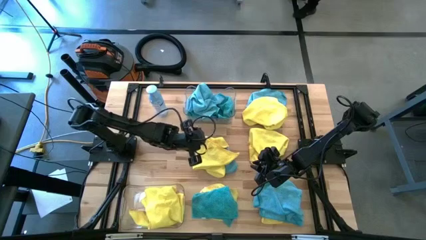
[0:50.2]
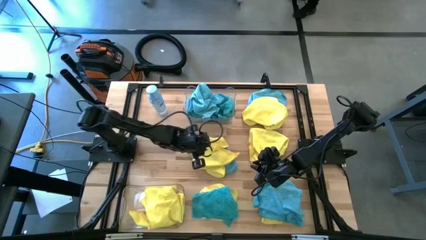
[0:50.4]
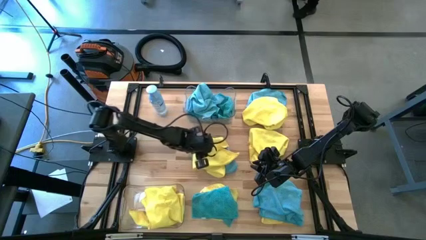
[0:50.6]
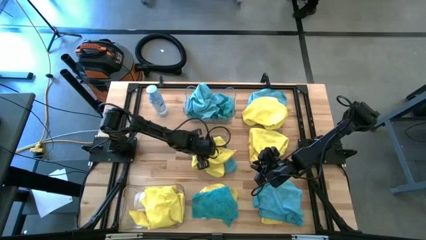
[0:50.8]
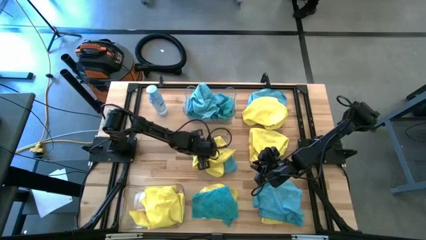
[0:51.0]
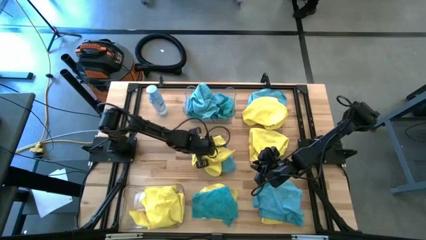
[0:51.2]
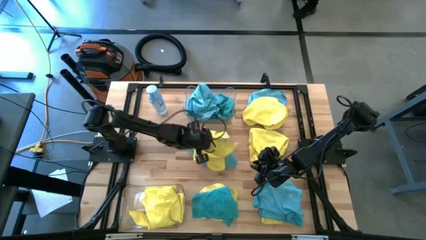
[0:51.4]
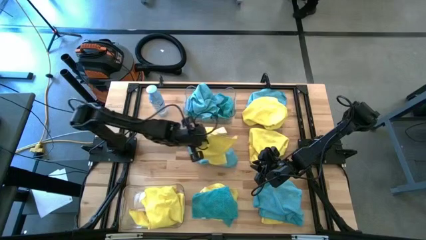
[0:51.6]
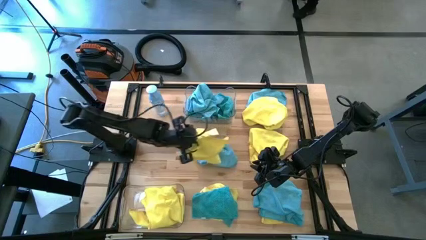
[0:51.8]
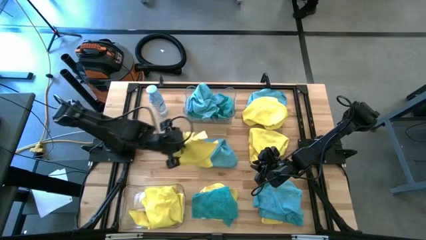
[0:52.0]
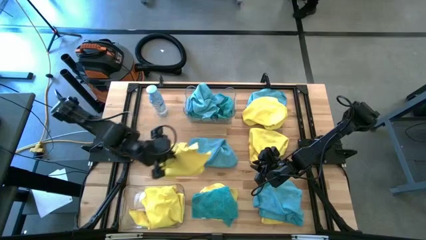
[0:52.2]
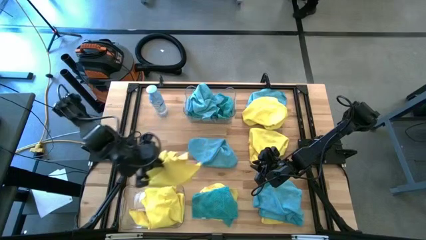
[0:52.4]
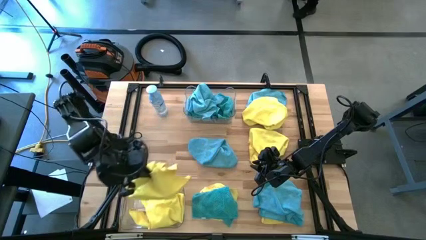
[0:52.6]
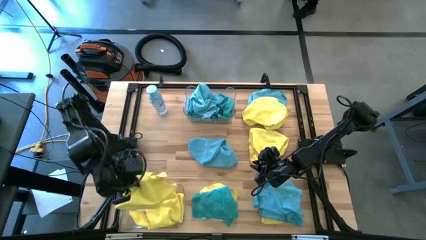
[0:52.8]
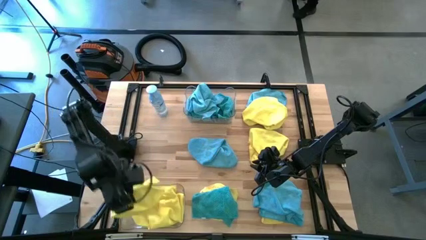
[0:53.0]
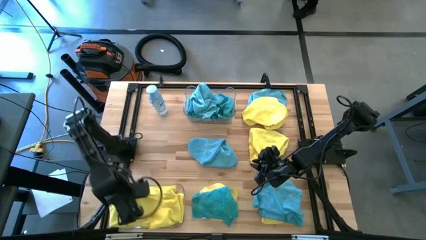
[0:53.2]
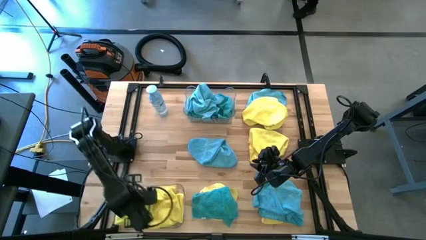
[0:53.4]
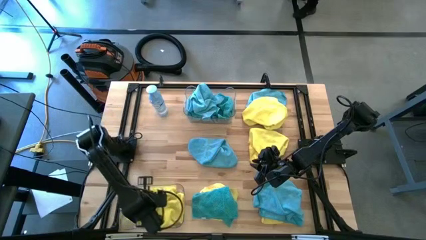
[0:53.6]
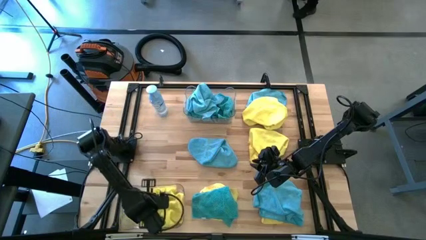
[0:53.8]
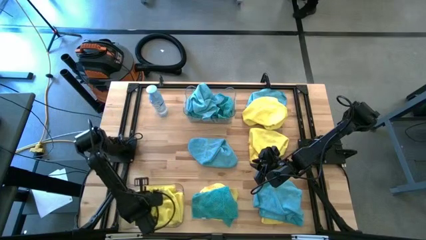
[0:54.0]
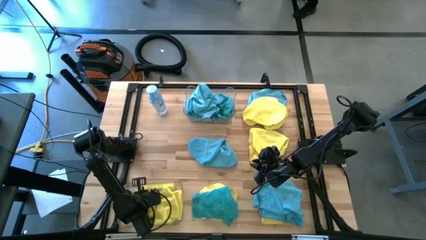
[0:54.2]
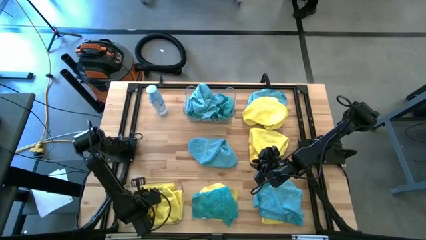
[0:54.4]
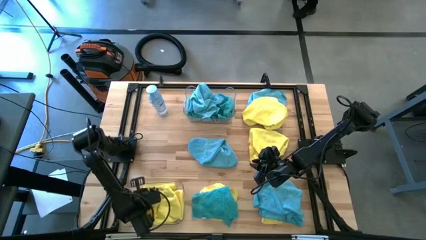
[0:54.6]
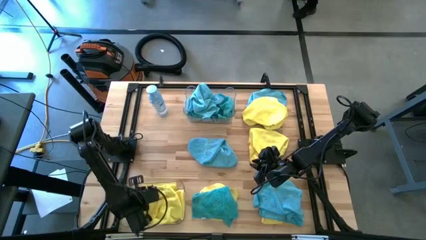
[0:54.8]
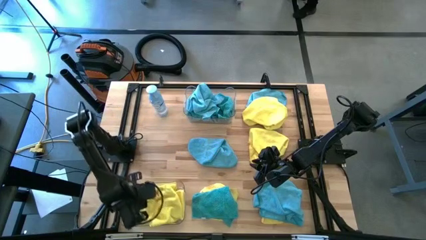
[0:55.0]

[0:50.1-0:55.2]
Task: Sort microfiber towel by color & place in baskets
Put the yellow microfiber towel into the bottom transparent bin

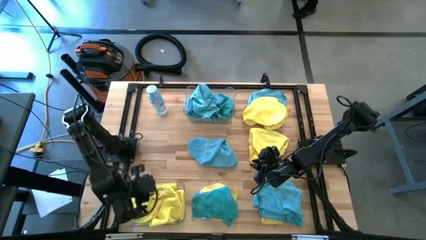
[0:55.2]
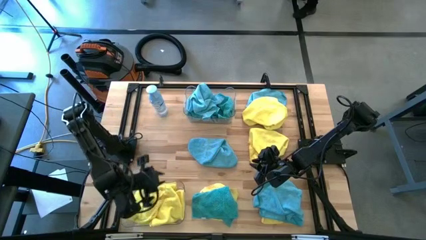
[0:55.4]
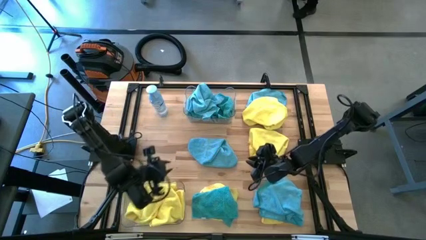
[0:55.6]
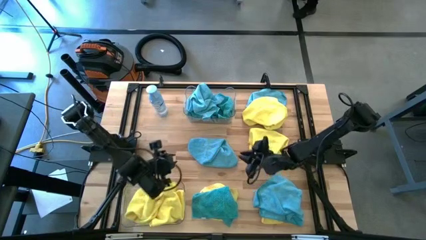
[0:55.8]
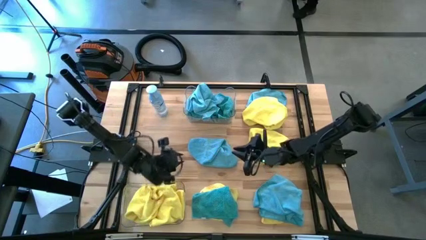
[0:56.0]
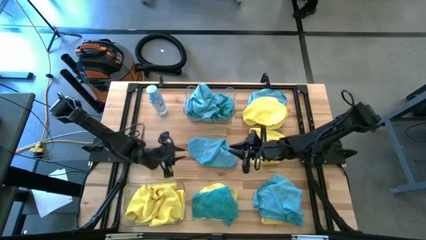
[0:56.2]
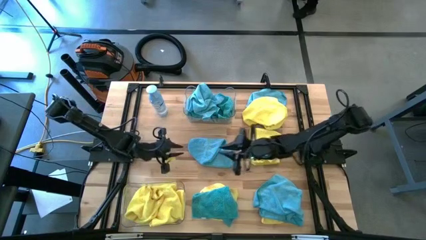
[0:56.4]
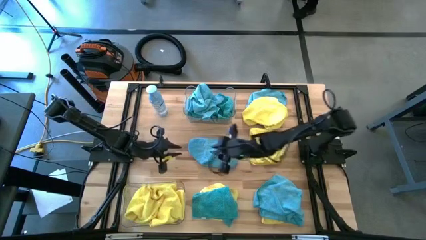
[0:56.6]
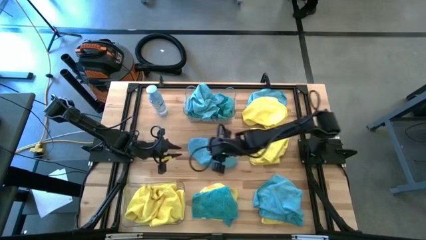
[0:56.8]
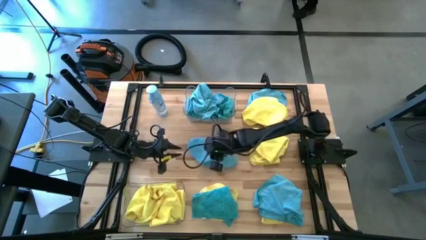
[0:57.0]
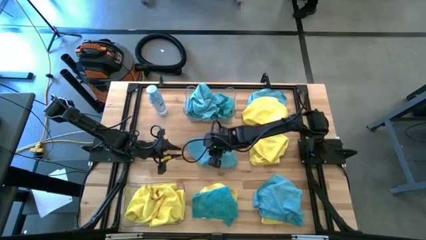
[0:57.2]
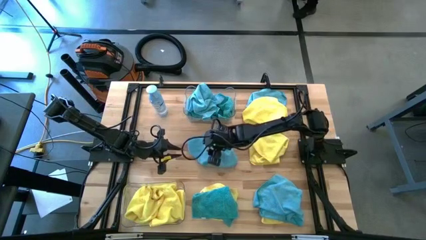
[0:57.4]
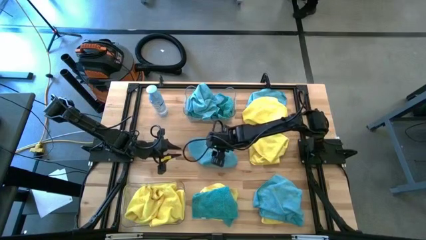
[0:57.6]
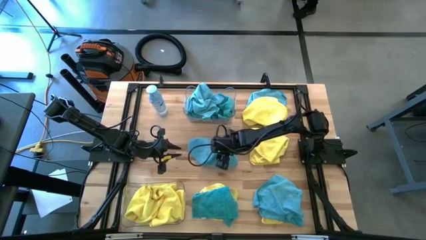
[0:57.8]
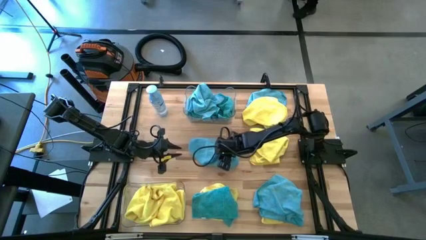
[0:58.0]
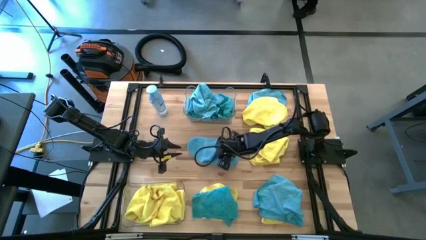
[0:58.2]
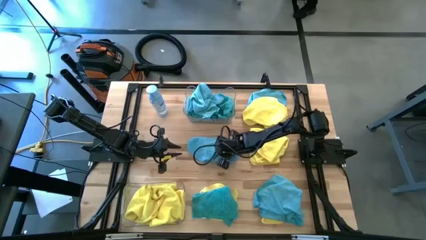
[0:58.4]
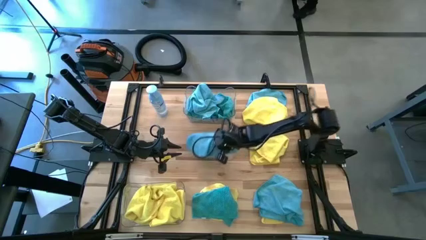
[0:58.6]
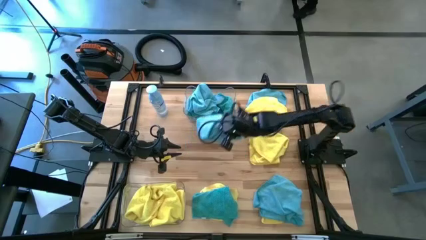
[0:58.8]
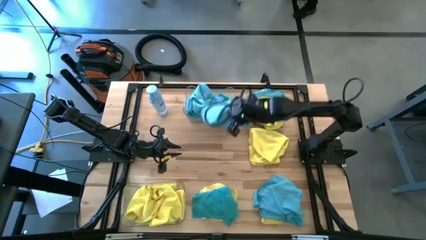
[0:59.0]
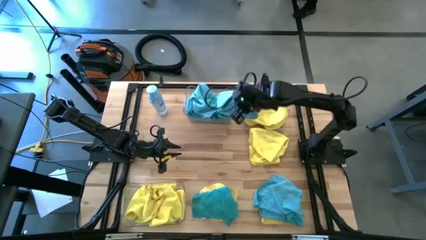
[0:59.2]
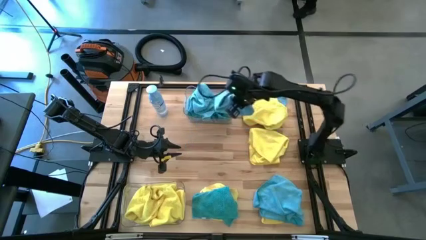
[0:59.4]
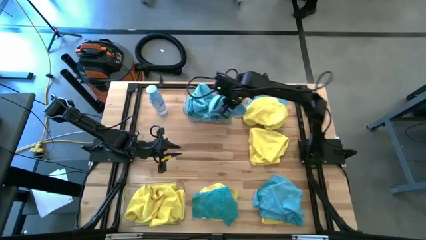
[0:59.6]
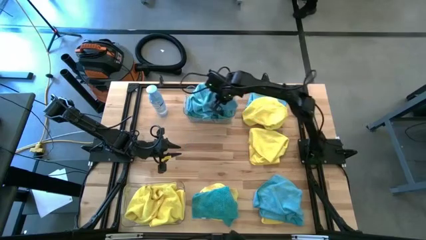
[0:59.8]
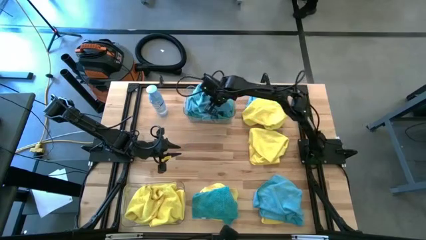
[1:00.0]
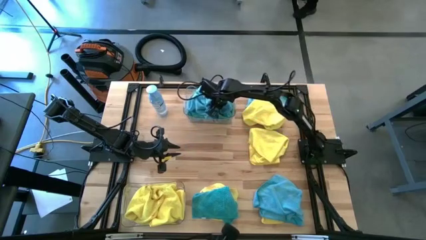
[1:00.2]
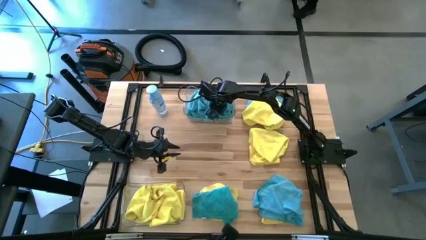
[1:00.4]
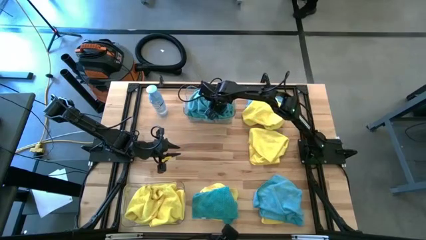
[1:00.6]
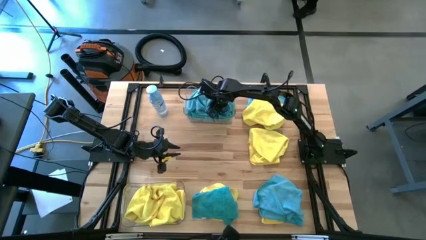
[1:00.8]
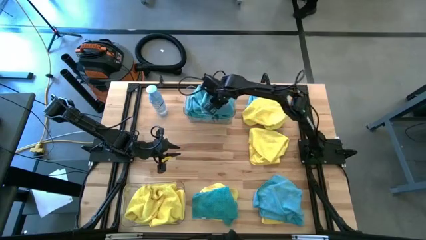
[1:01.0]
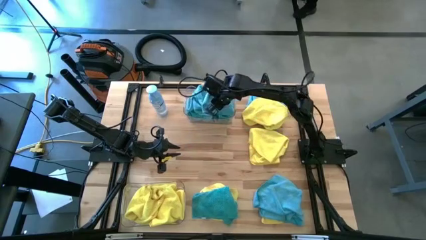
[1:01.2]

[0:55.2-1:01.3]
Put the blue microfiber towel into the top transparent bin

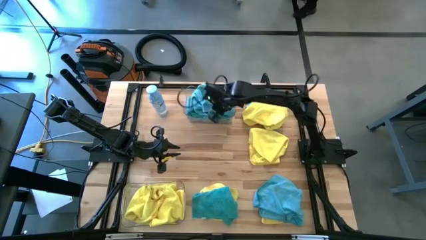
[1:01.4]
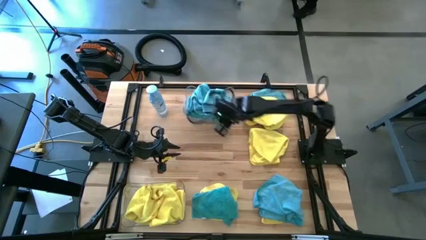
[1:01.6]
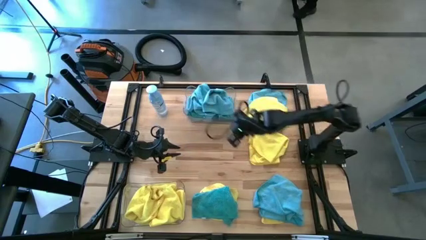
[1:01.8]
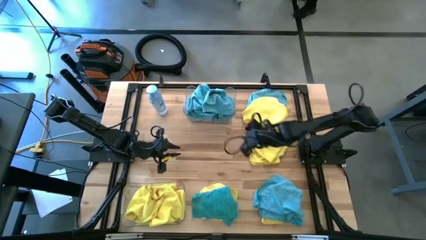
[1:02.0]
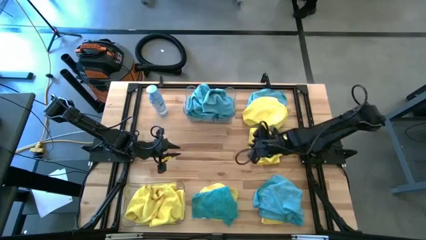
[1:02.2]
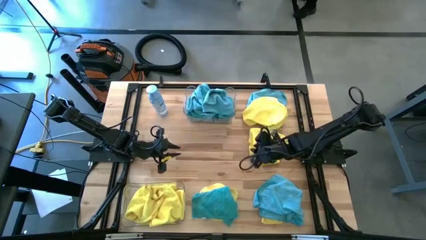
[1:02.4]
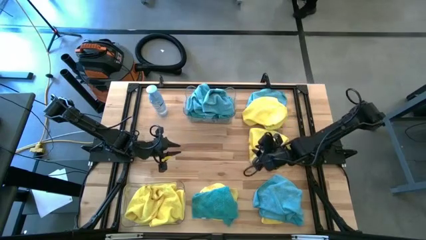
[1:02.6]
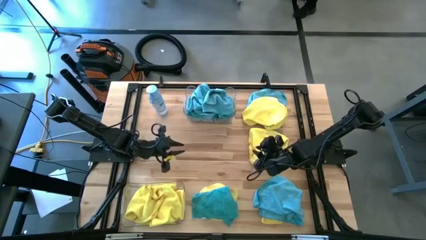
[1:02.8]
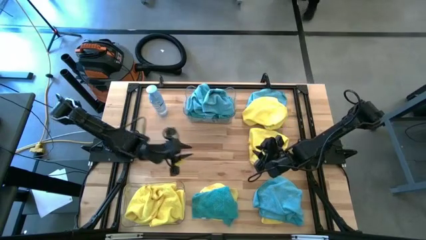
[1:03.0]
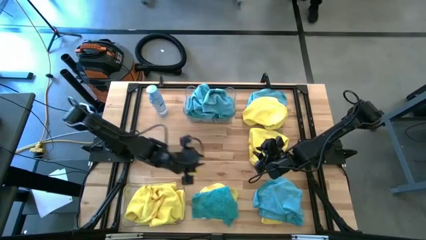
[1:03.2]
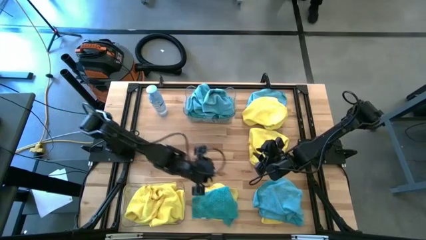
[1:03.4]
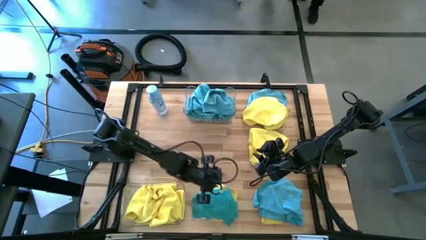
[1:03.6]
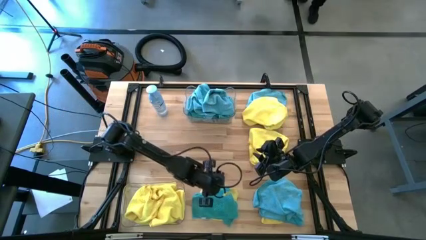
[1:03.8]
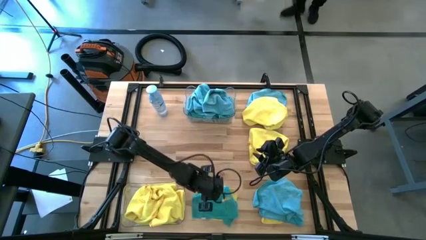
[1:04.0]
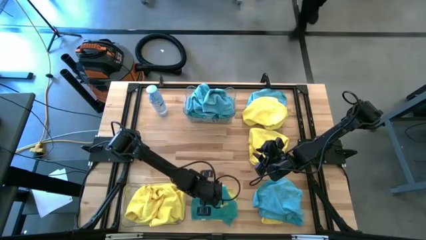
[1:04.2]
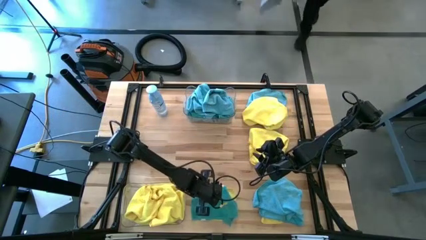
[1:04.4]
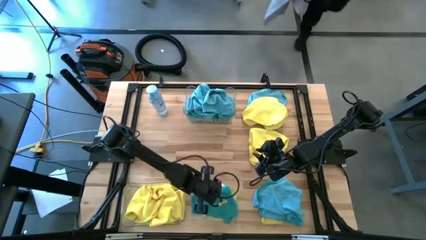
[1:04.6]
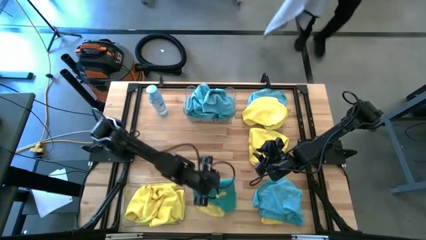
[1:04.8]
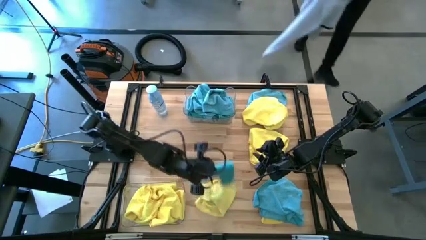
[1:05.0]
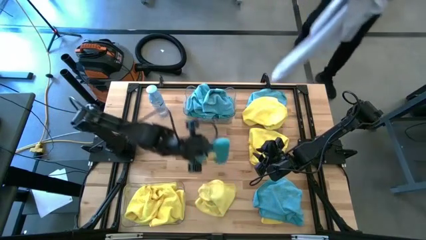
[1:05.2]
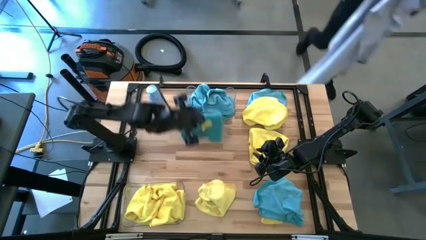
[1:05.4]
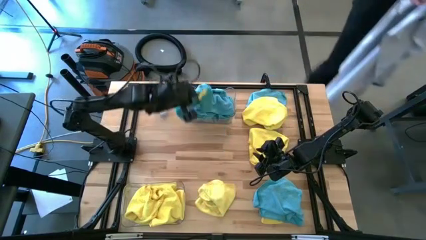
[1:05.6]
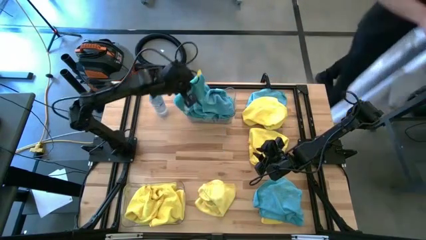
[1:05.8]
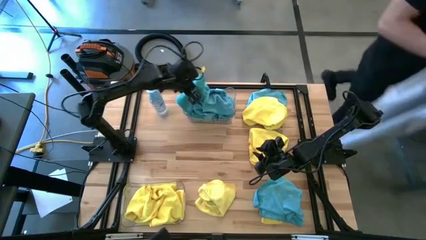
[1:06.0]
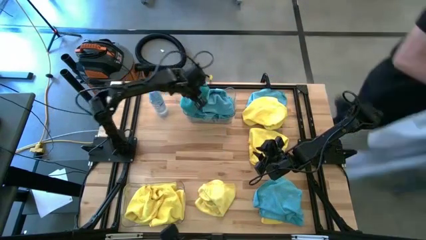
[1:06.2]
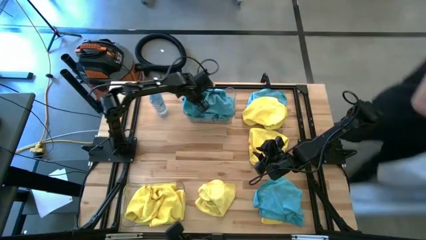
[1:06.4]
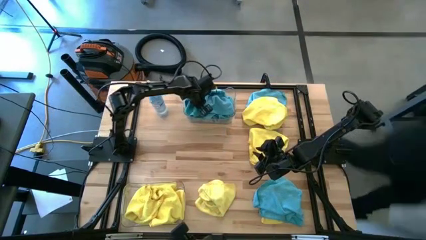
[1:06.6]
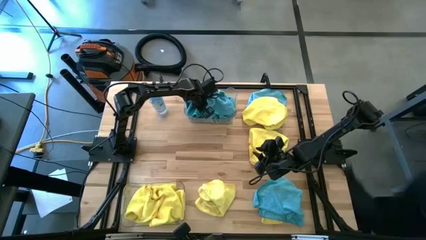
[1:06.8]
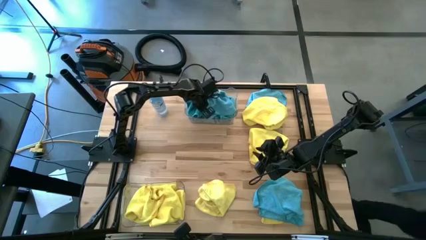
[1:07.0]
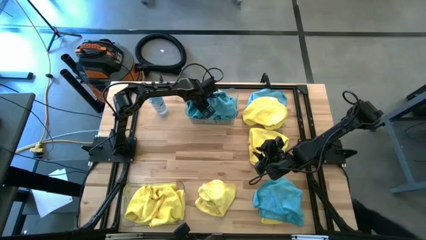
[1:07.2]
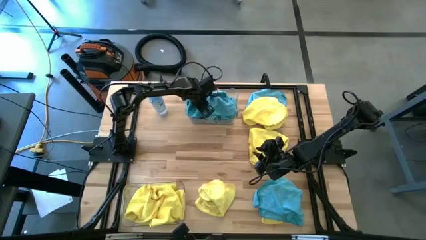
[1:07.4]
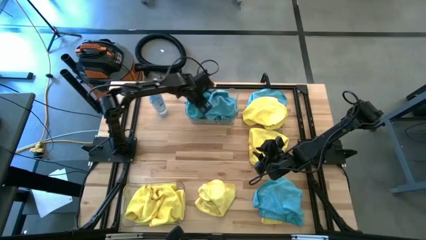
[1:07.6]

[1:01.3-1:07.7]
Put the blue microfiber towel into the top transparent bin
